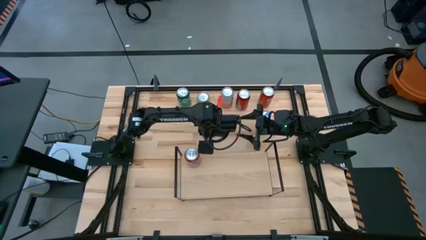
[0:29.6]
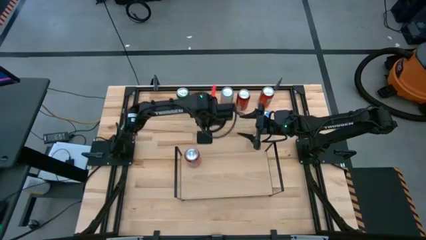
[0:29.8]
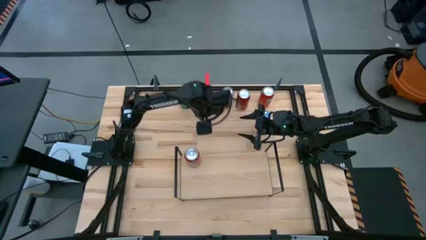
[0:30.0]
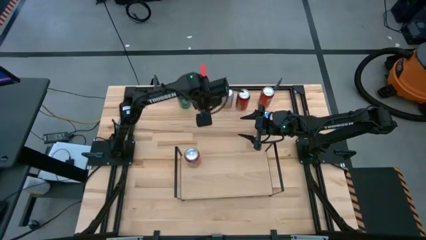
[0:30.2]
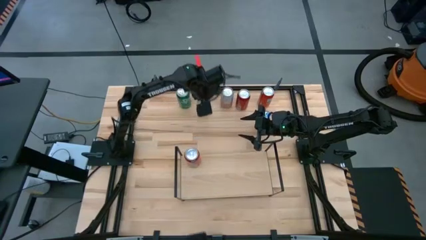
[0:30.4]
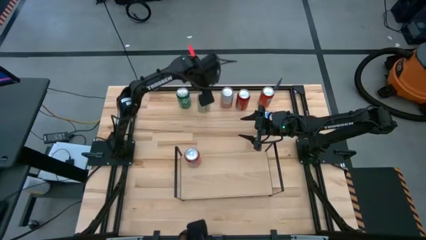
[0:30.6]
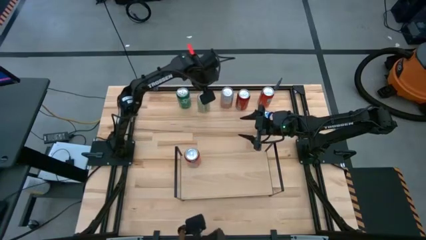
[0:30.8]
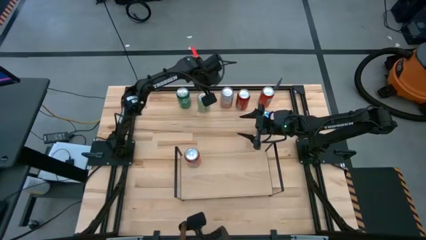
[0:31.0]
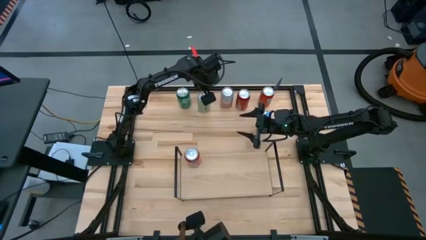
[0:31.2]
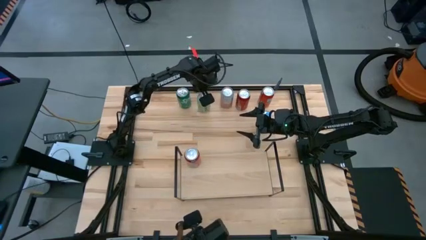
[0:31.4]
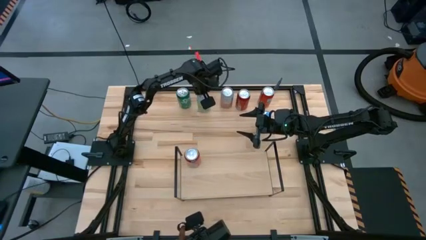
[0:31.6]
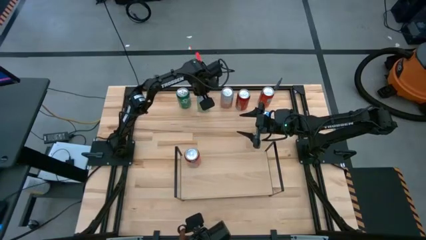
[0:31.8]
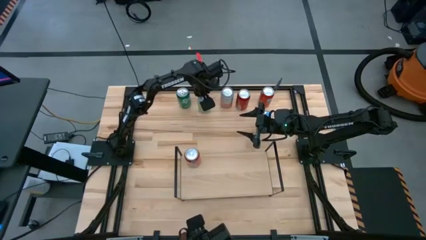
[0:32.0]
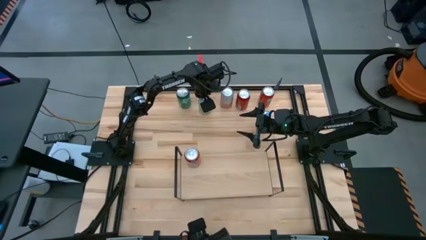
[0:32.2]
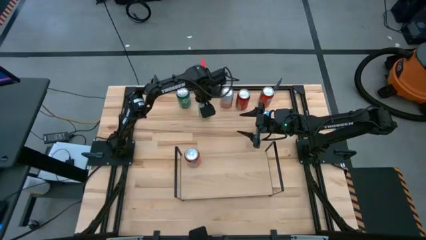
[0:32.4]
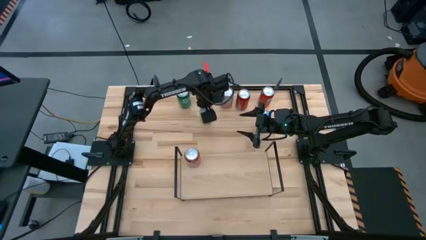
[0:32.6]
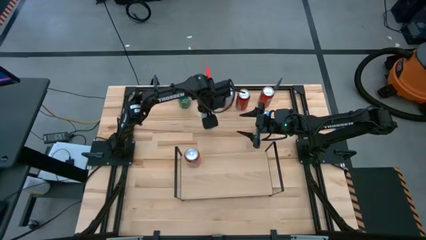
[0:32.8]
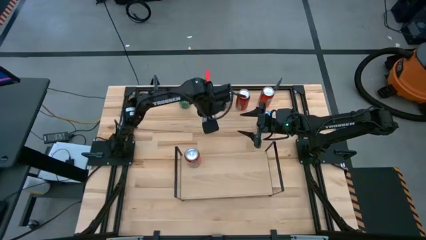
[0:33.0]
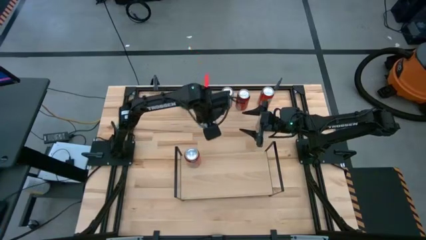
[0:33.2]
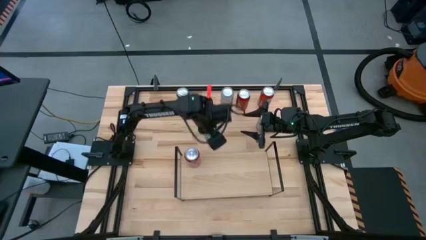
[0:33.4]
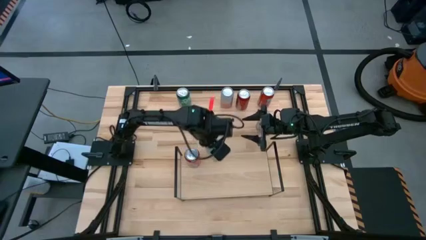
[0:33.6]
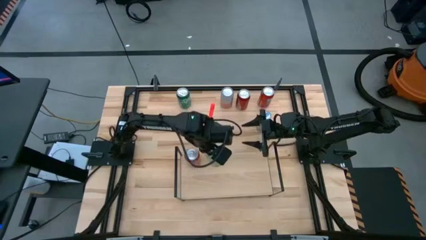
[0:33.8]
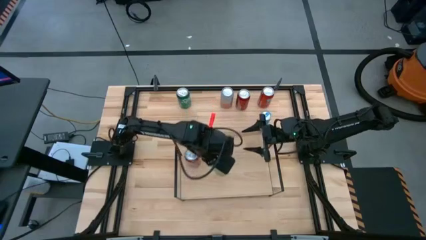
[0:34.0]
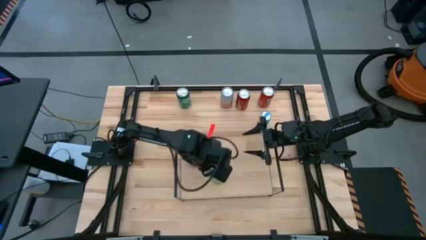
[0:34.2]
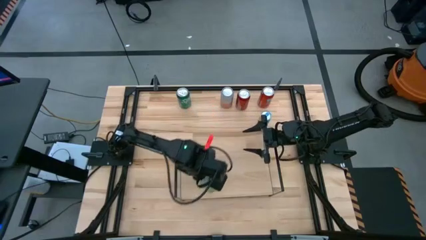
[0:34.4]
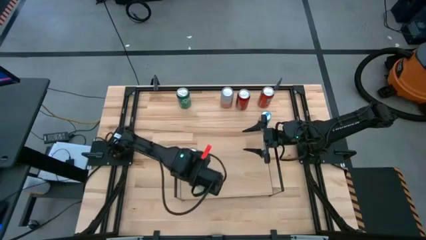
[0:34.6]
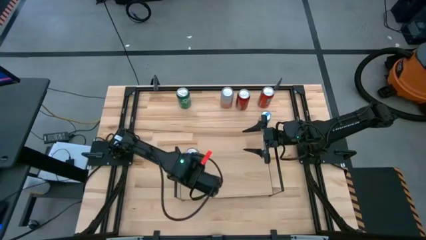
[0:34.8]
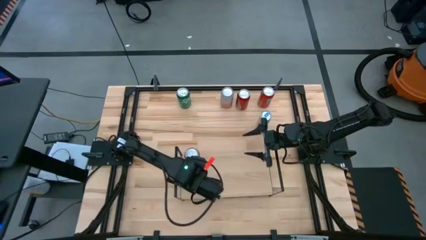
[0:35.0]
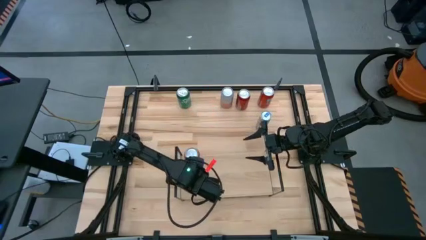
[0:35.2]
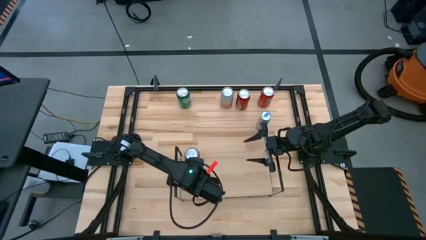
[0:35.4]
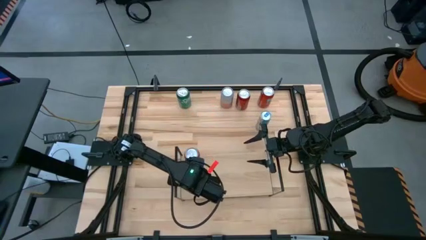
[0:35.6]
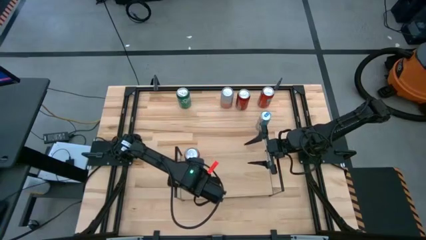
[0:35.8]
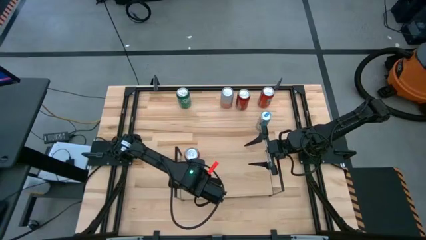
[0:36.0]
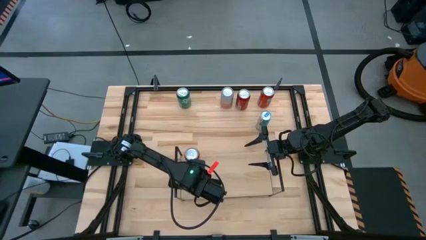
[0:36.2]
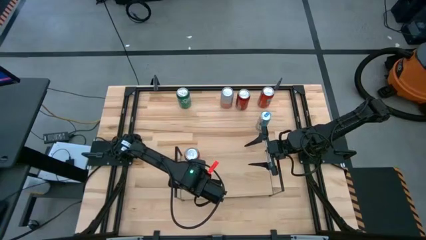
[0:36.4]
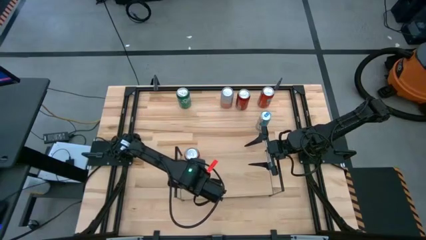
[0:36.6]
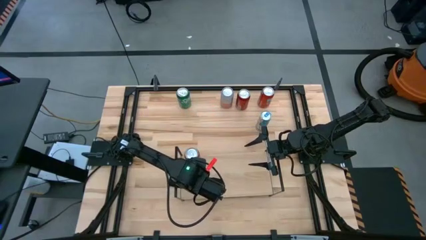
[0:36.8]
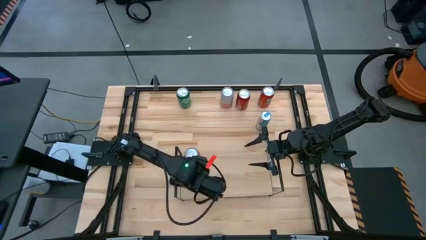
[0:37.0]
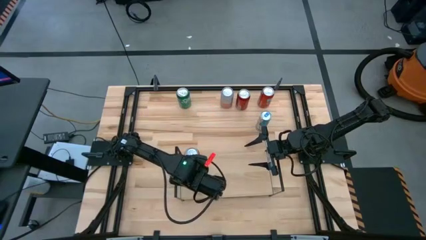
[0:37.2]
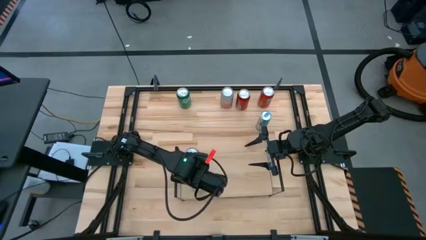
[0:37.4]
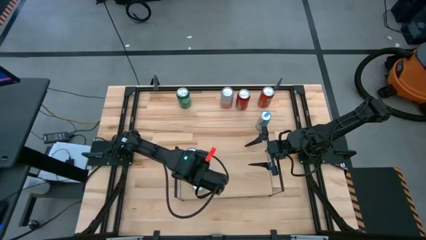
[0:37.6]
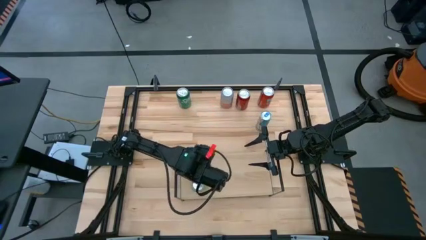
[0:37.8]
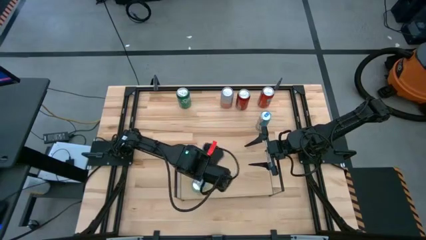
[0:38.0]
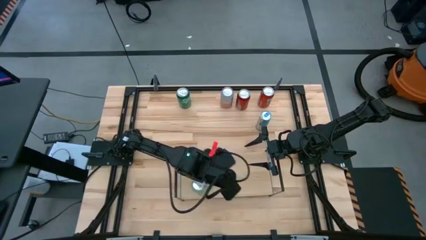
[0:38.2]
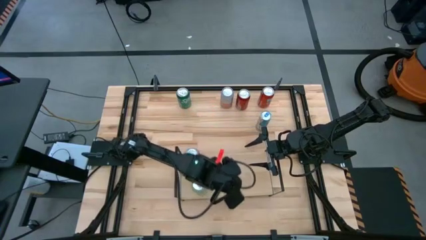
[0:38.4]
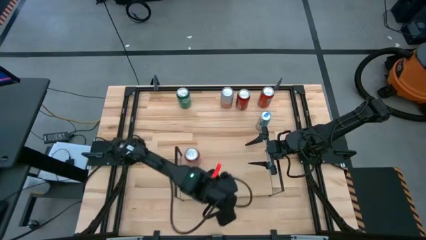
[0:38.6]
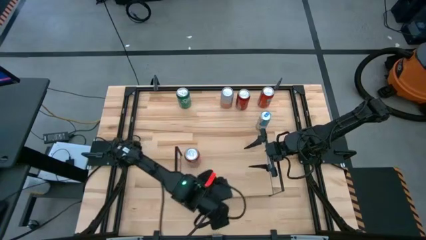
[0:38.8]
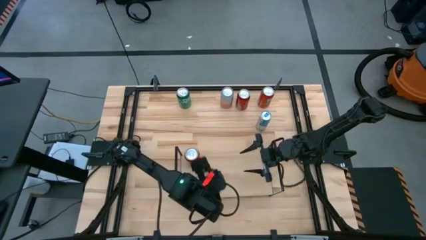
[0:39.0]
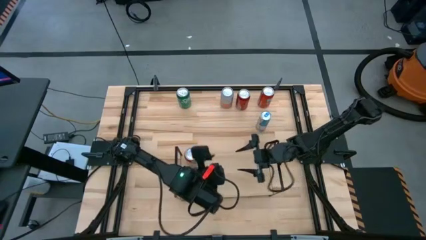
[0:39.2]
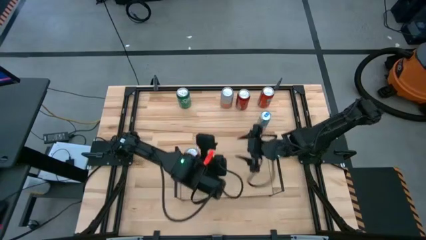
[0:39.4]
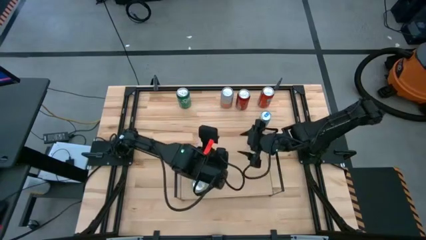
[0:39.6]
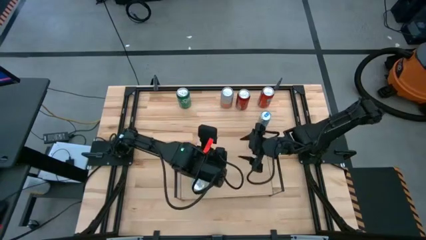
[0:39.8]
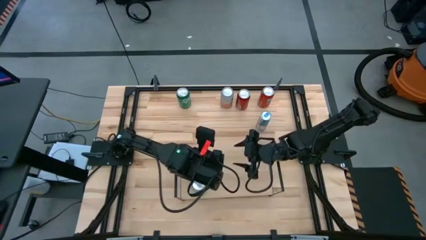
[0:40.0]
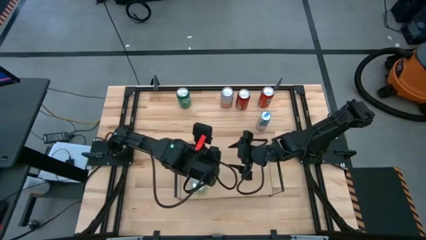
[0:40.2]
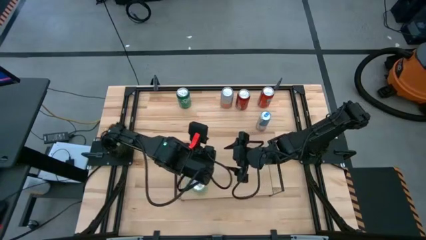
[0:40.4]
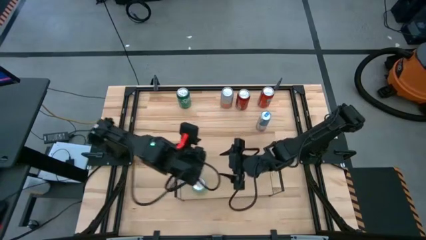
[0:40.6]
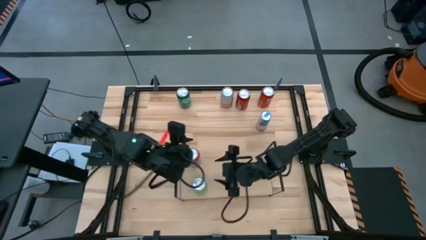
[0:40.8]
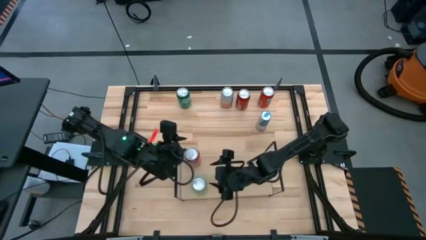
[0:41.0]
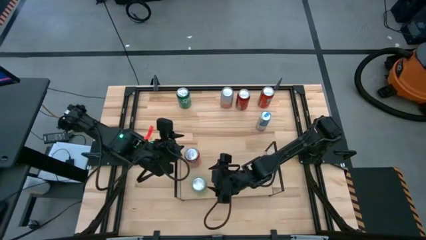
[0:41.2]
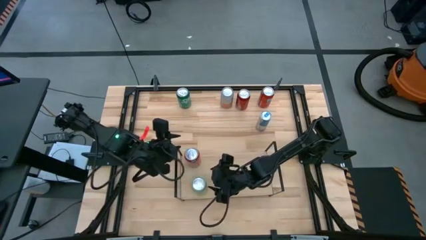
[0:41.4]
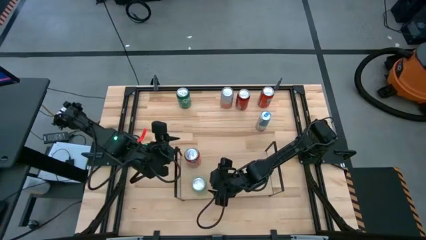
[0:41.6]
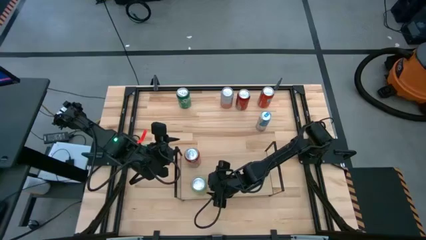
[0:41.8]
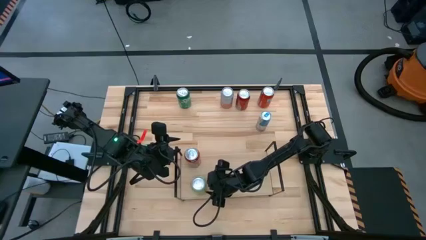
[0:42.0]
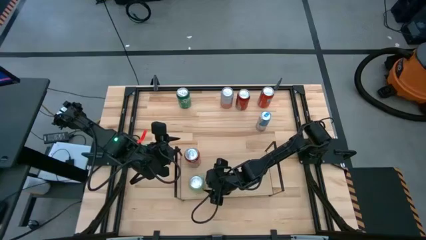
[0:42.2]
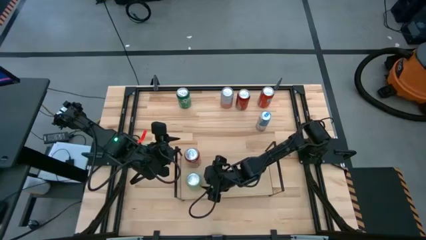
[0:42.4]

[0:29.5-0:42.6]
Task: Place canned beverage on shelf
Put the light green soda can on the shelf
